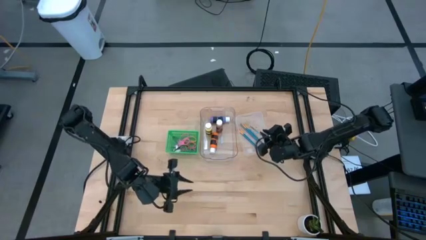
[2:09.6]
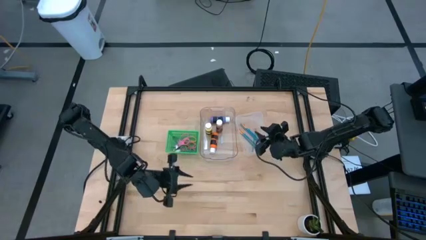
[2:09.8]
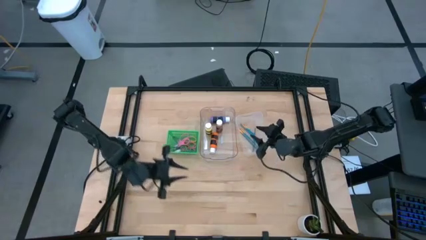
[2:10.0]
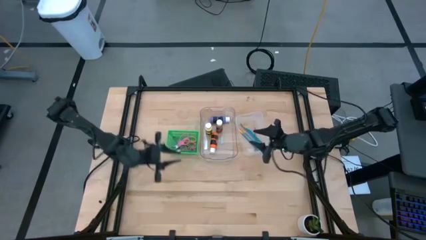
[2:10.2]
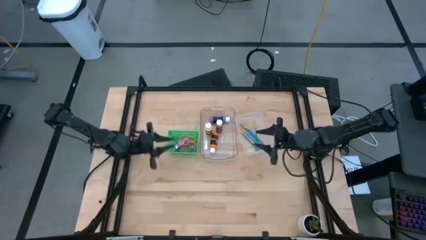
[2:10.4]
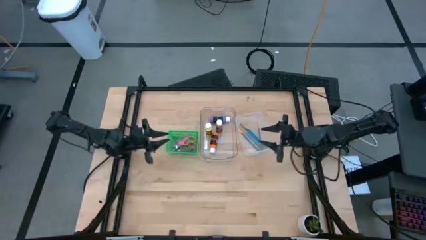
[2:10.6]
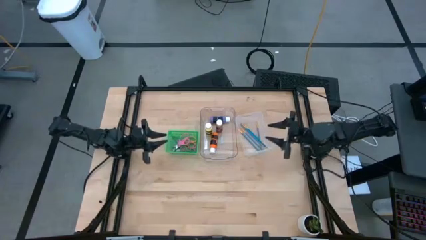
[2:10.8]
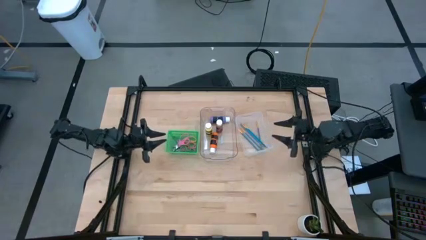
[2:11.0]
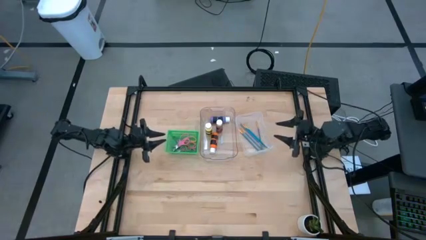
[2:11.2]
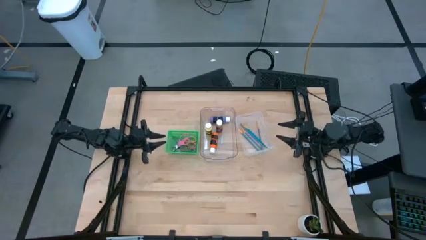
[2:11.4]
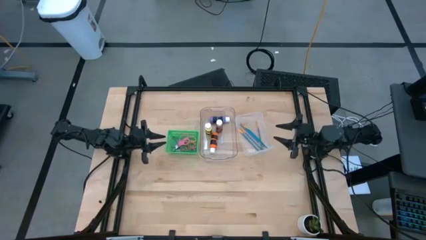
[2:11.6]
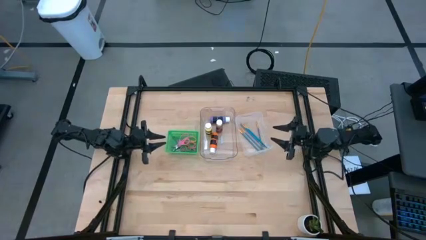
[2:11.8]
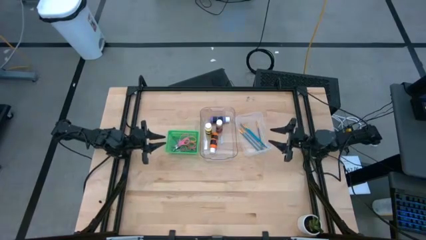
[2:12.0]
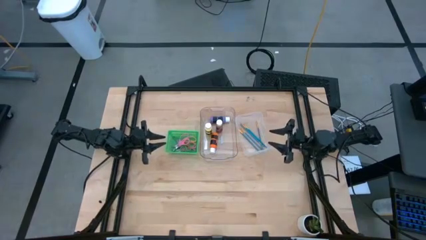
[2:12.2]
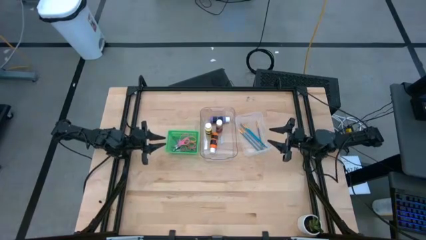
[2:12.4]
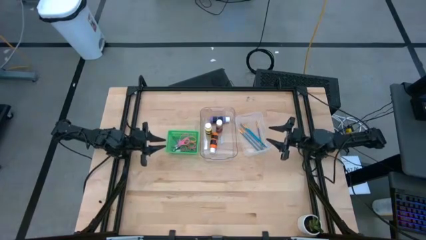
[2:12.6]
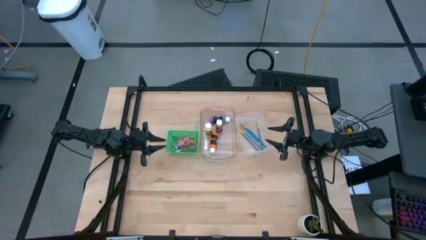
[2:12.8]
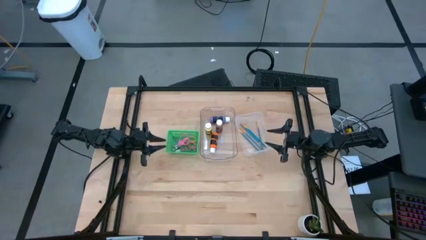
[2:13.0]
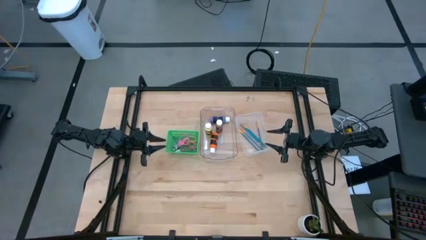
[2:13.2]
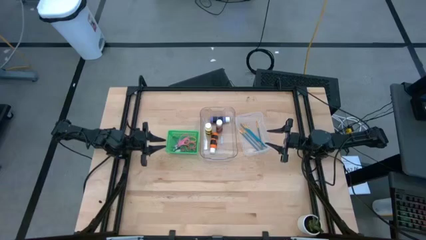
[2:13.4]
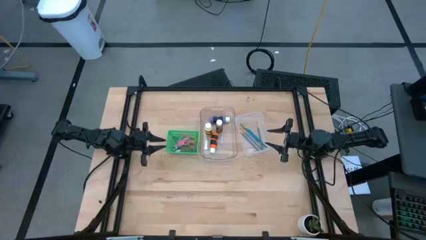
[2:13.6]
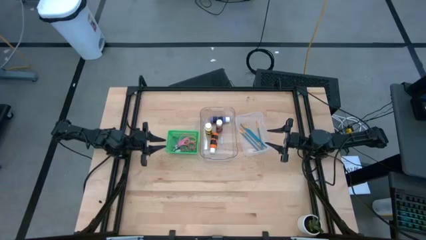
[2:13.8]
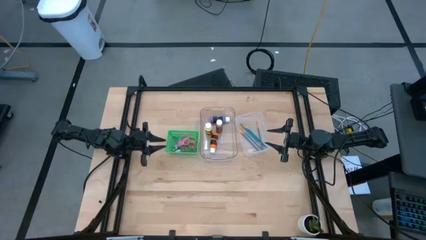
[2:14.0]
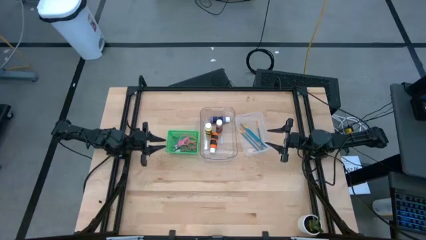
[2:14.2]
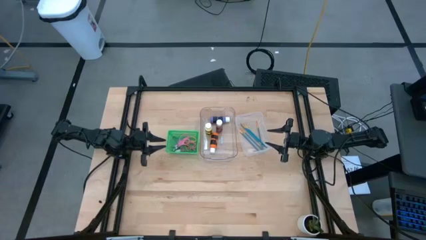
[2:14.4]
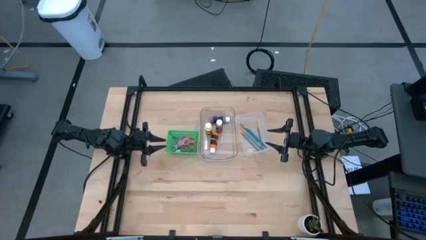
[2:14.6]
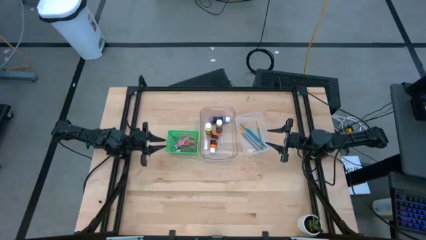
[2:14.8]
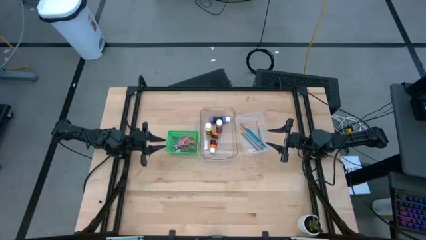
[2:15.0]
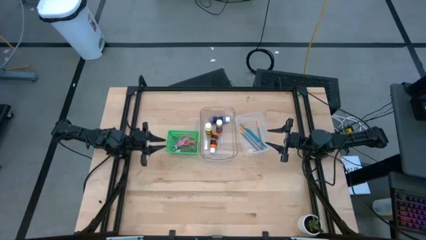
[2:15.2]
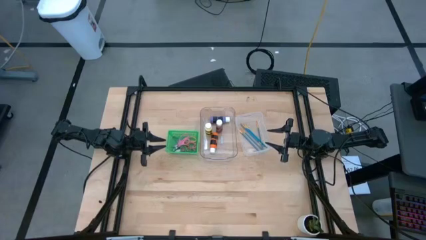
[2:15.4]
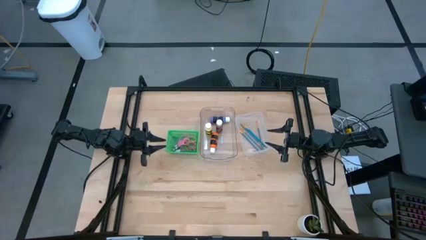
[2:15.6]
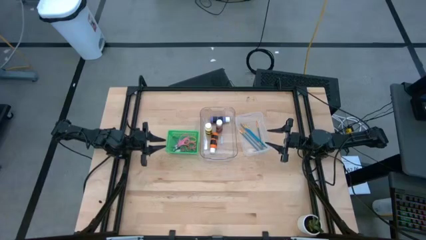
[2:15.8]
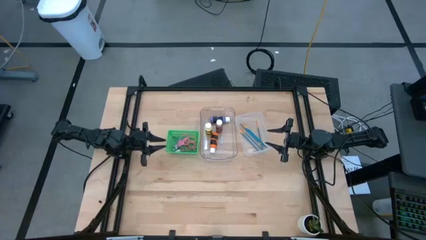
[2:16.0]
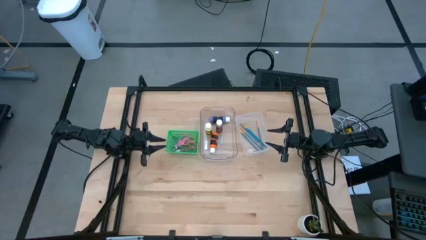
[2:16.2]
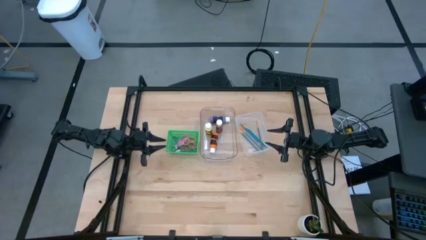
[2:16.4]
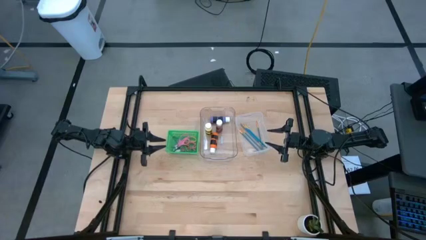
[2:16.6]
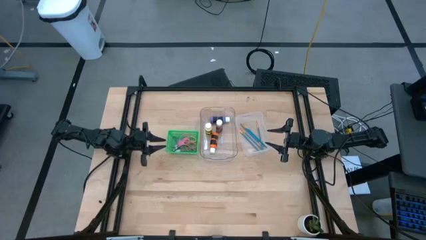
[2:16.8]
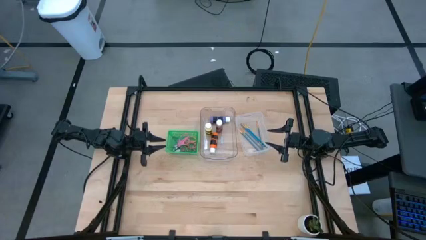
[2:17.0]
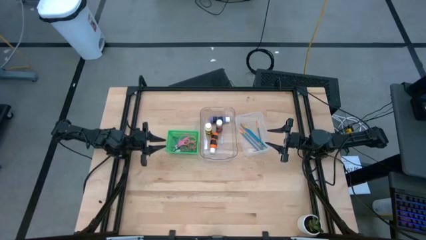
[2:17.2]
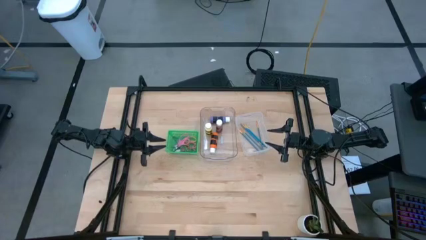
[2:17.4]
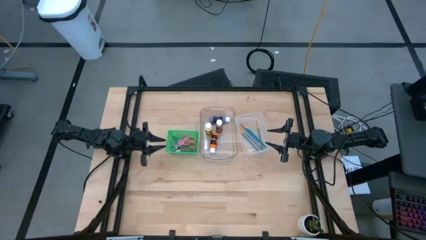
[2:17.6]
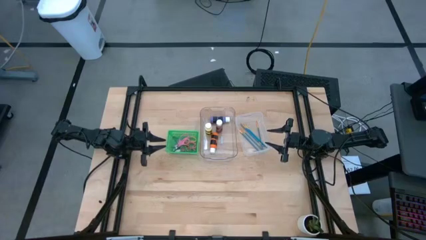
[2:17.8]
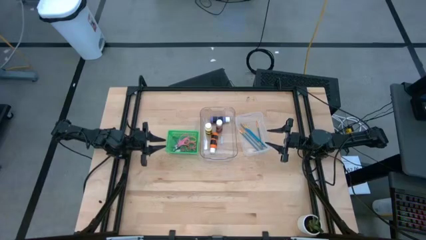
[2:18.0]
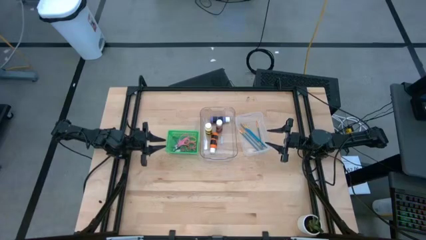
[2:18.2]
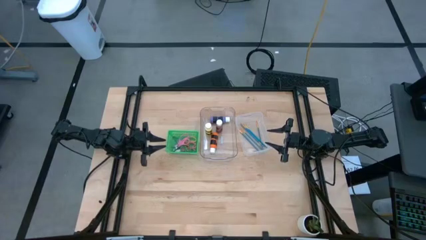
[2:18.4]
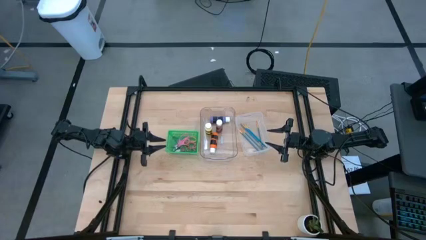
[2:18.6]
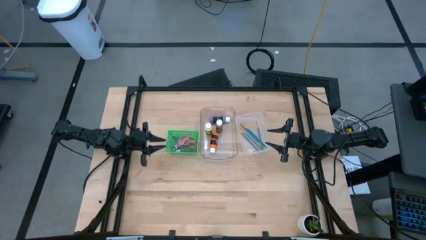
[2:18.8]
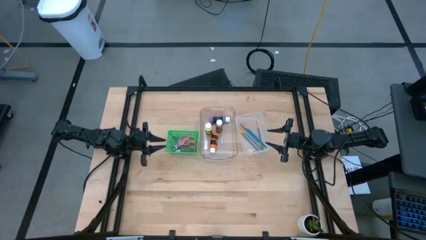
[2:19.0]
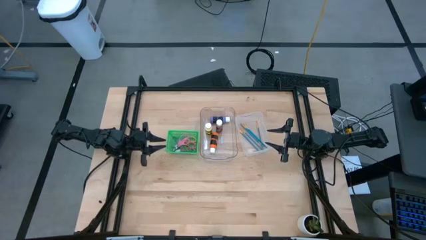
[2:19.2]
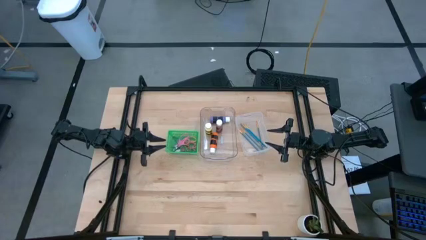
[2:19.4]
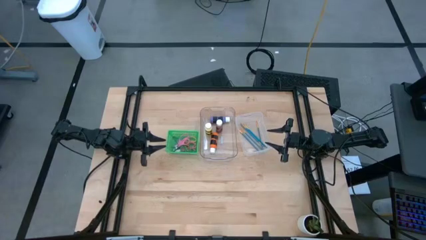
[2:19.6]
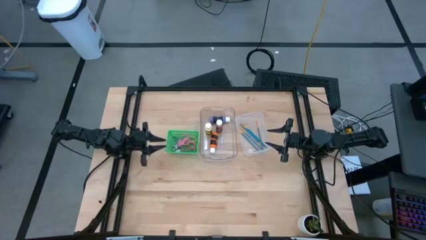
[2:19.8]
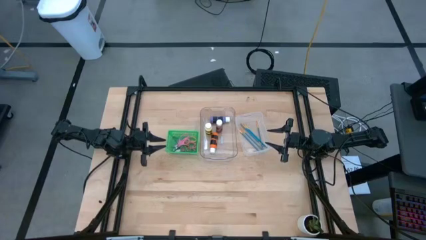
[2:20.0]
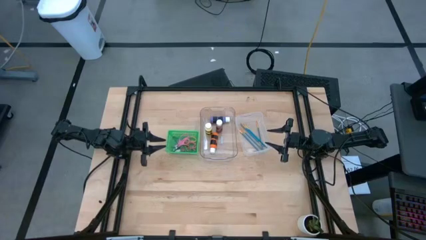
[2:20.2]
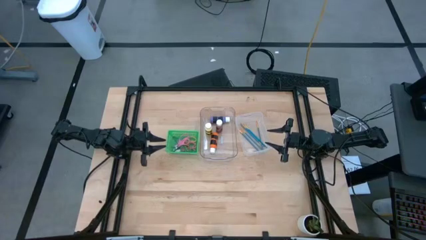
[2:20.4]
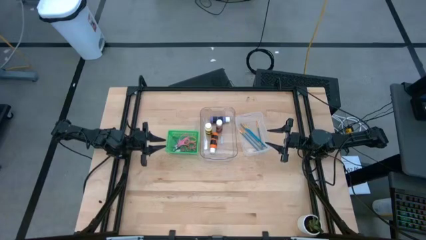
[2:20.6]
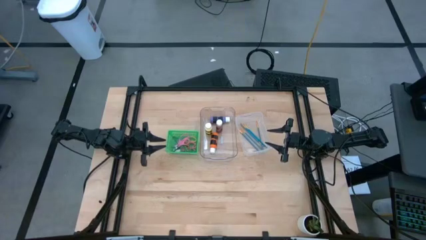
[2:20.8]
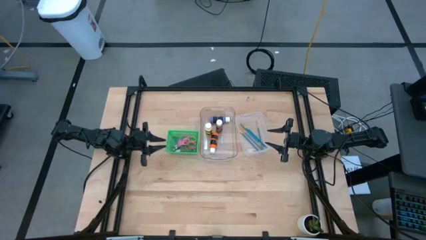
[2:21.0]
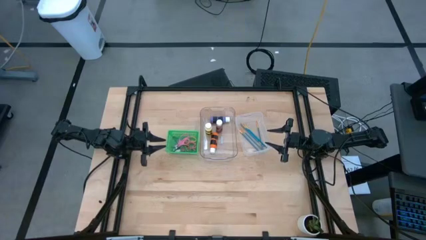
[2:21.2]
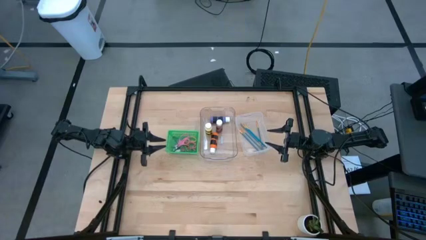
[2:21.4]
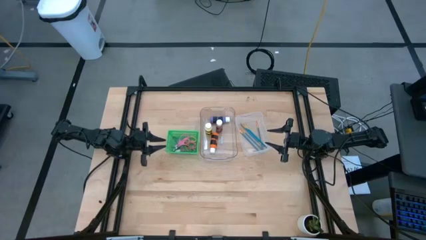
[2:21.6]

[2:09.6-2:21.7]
Task: Pick & Place Paint Supplies
Return to Home Position

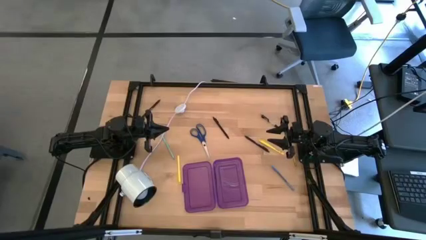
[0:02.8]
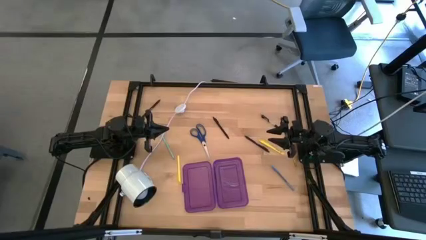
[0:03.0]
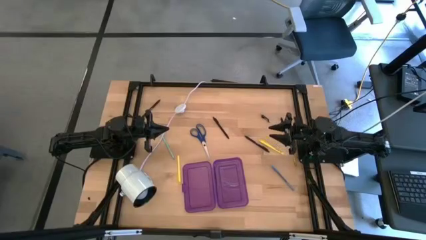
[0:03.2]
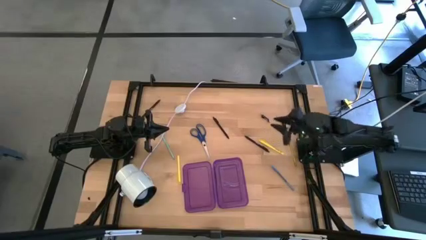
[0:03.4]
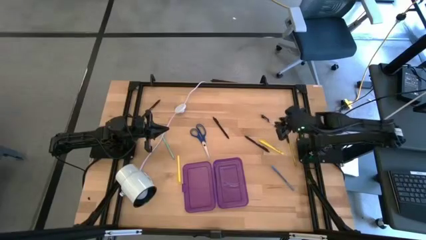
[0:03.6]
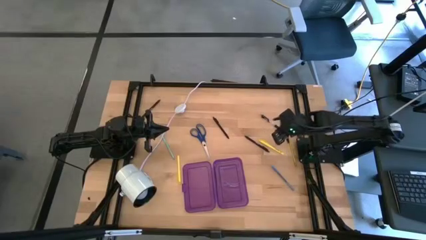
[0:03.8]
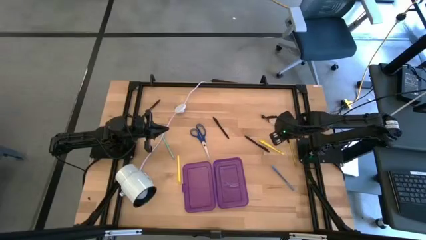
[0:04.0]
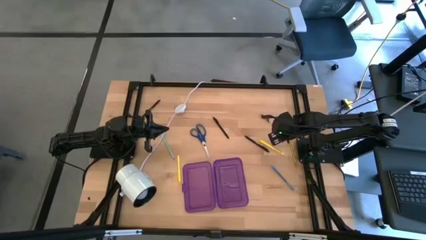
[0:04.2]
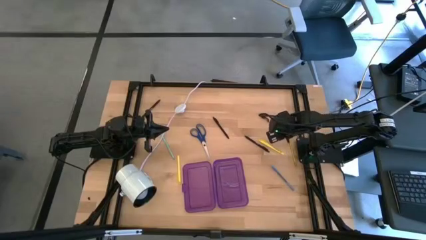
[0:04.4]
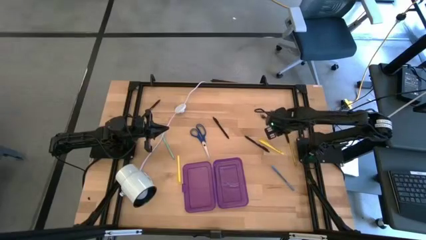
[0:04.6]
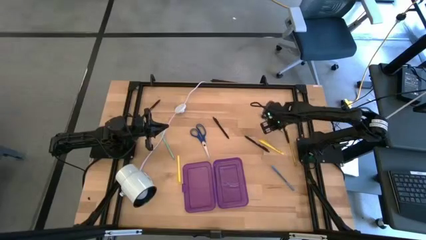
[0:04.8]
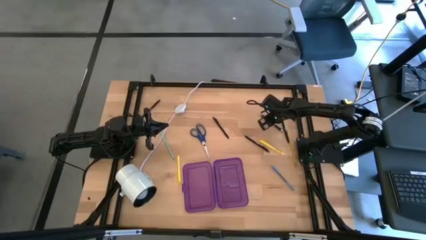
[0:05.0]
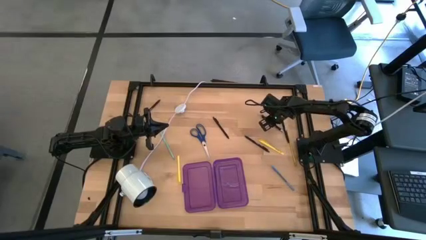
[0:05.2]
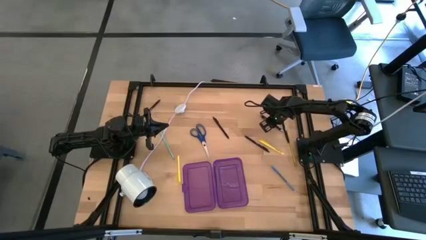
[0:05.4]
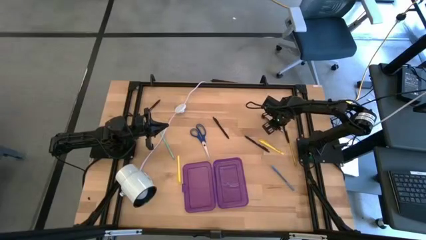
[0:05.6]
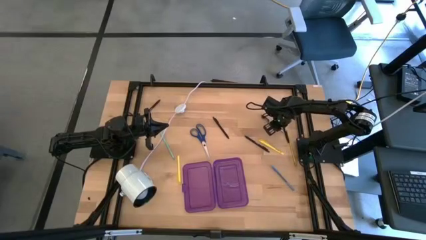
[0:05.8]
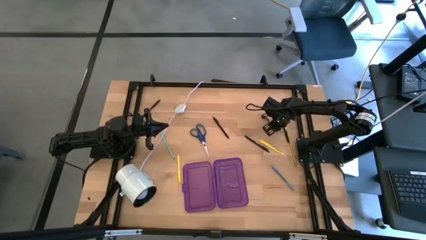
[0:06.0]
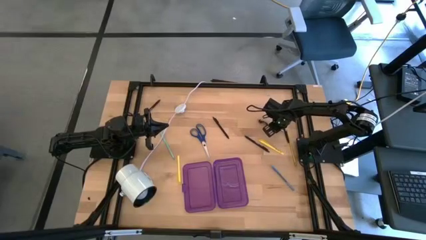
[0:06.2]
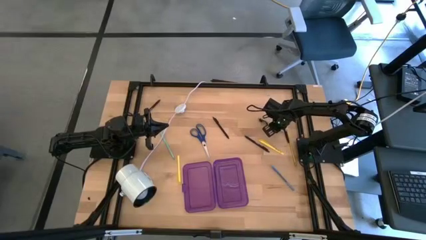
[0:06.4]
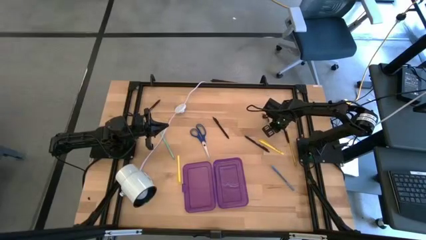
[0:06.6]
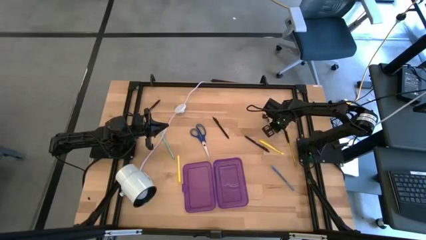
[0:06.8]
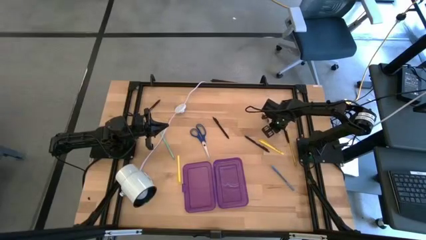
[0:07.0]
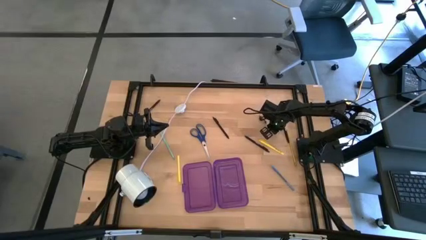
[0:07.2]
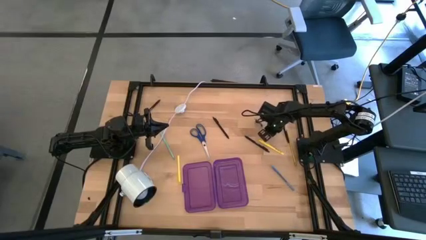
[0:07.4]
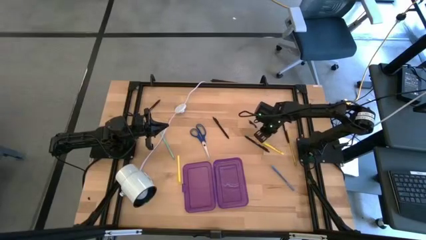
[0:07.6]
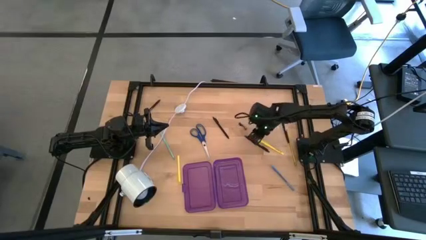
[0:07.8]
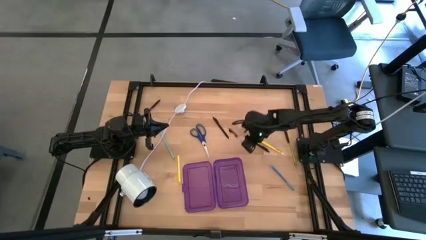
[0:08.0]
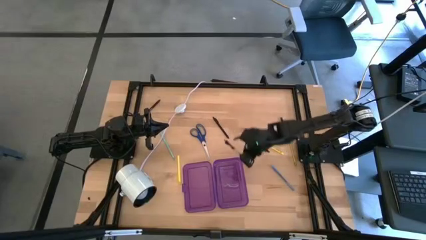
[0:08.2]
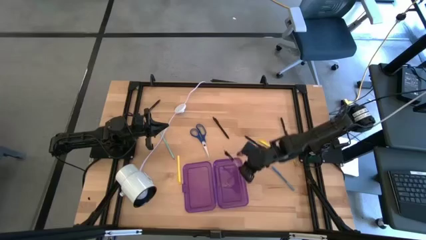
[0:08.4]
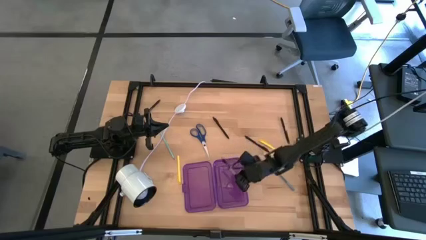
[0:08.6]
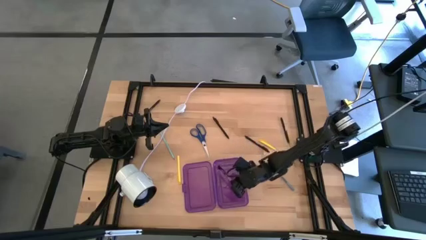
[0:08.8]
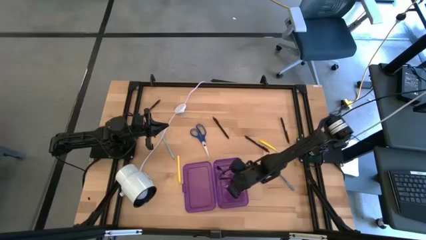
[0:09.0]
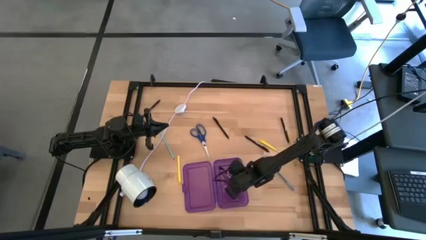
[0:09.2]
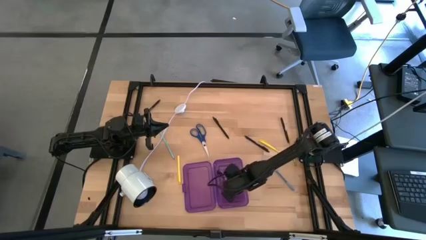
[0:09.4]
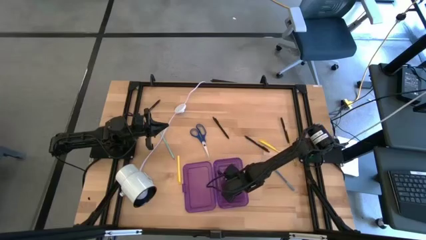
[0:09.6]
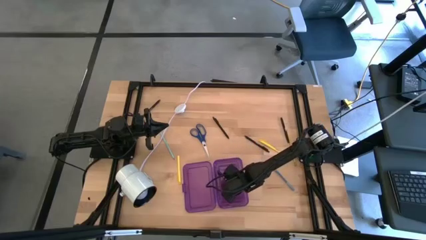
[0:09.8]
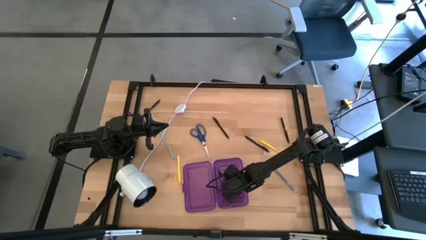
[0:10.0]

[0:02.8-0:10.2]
Task: Pick & place school supplies into a supply box
Put the transparent pen into the purple supply box
